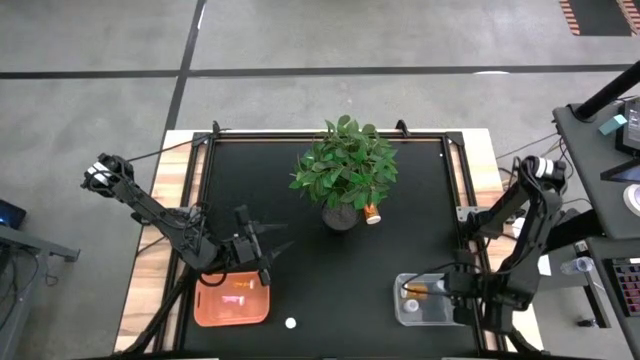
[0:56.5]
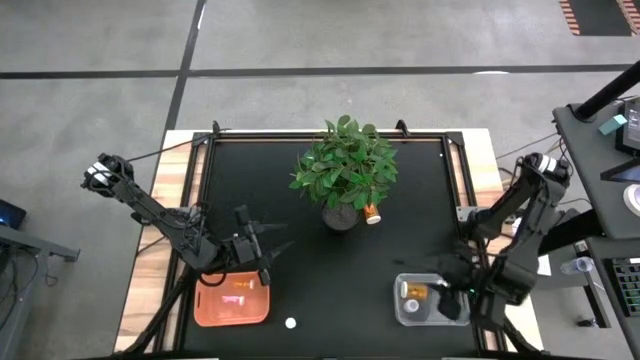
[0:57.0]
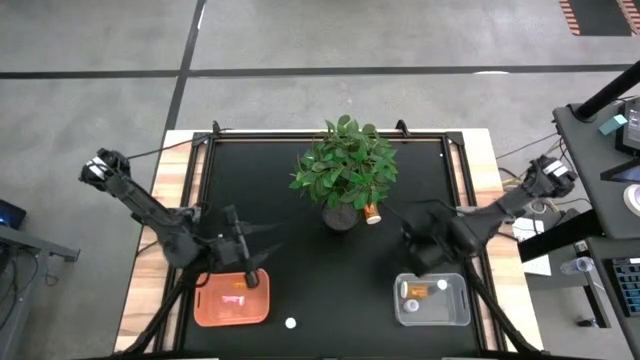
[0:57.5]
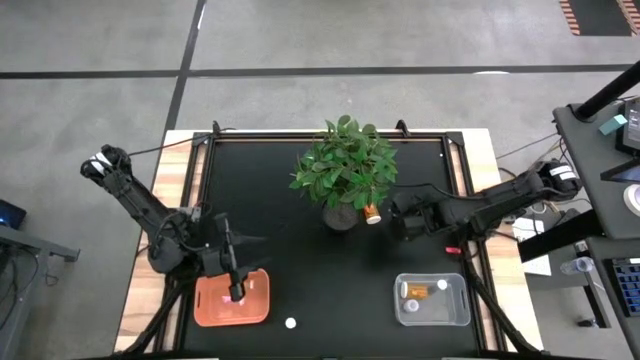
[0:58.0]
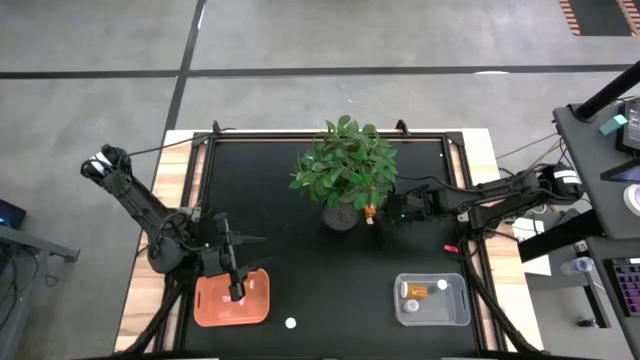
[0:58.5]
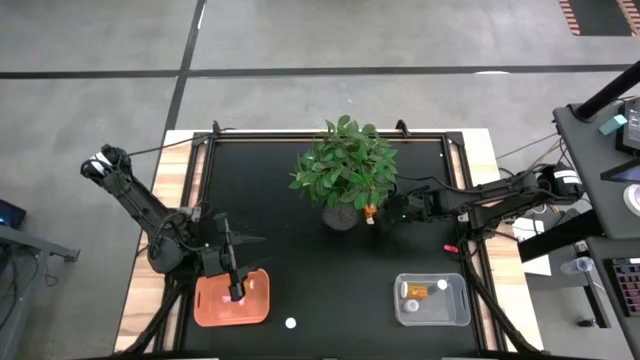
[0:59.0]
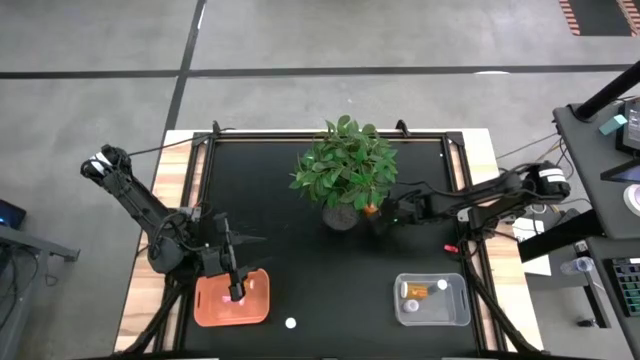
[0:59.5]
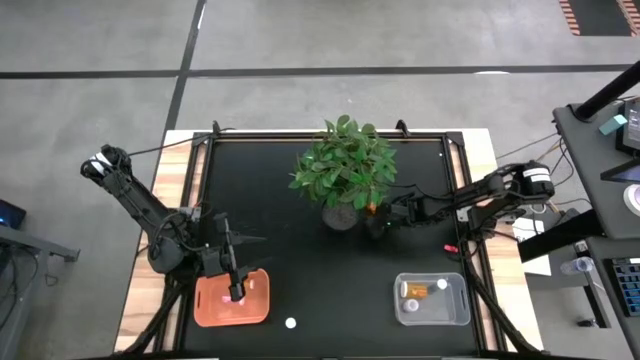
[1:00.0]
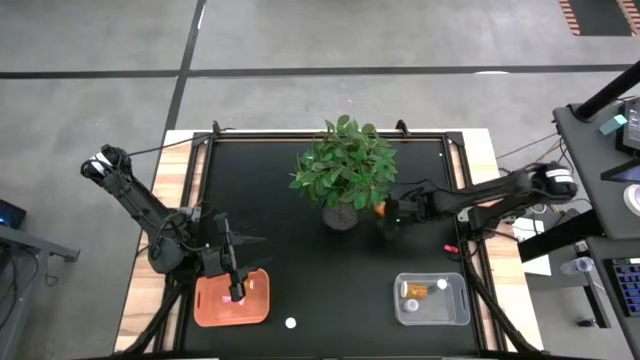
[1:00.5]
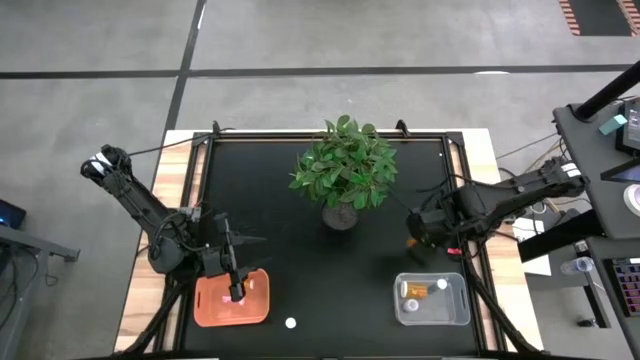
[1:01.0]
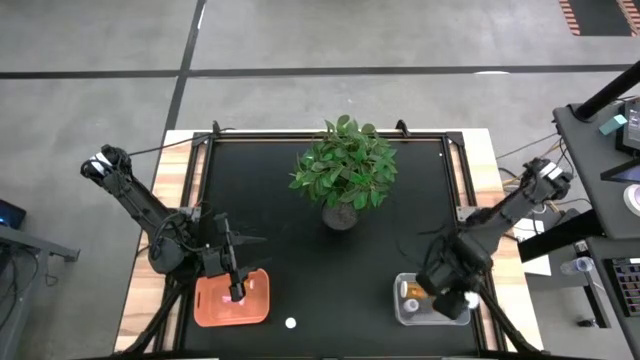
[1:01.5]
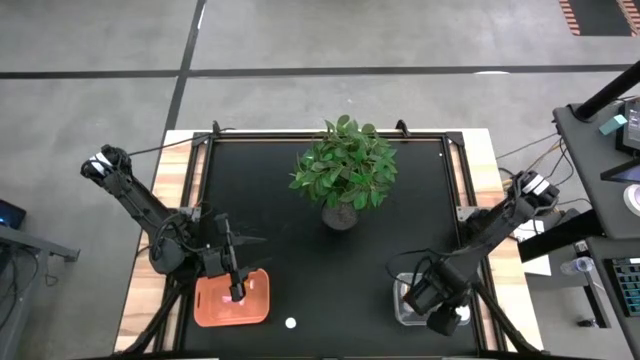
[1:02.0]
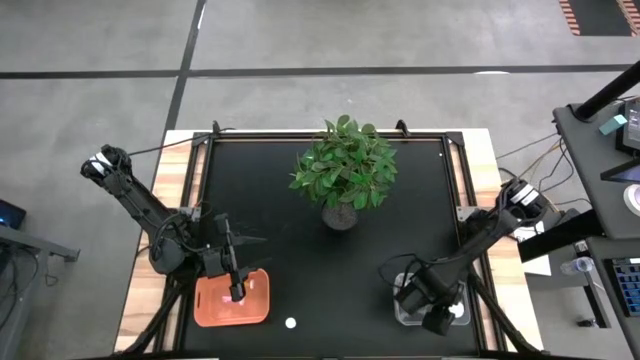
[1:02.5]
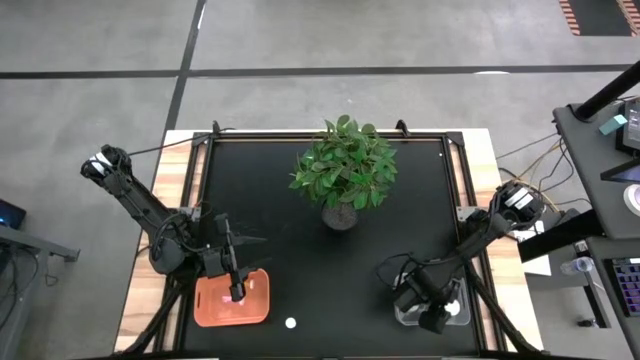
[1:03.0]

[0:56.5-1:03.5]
Task: Pick and place medicine bottles into bin by pill shape (circle, oval)
Put the orange capsule bottle into the transparent bin

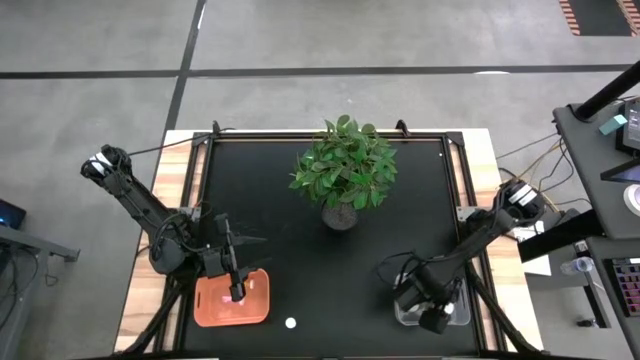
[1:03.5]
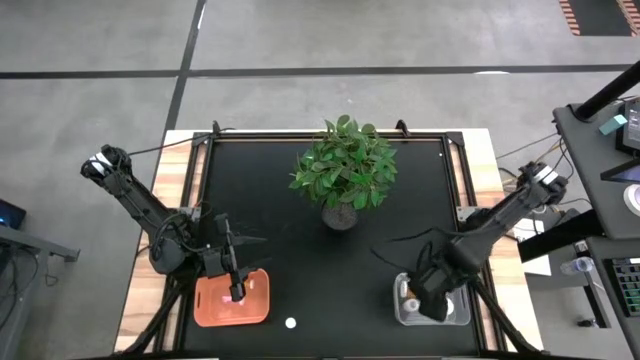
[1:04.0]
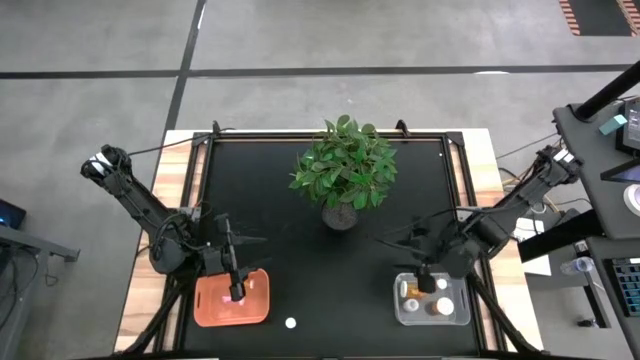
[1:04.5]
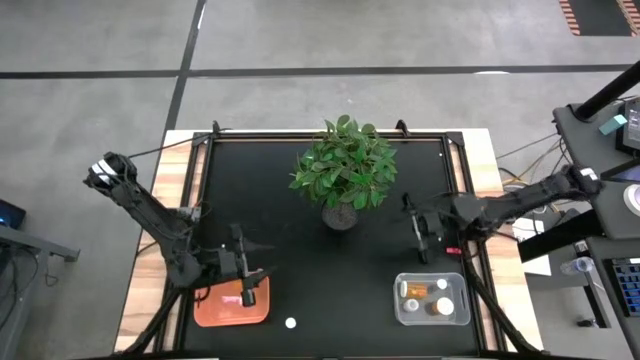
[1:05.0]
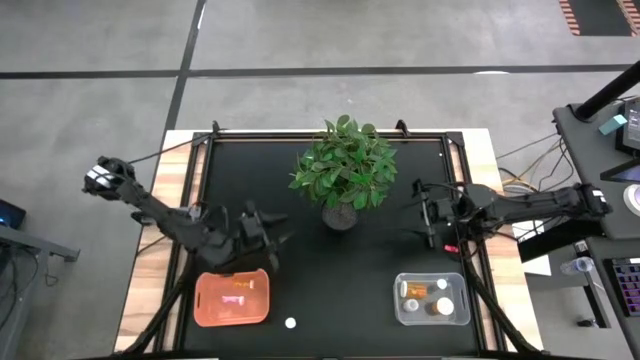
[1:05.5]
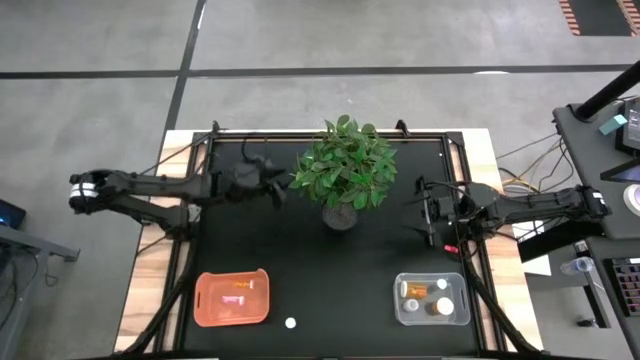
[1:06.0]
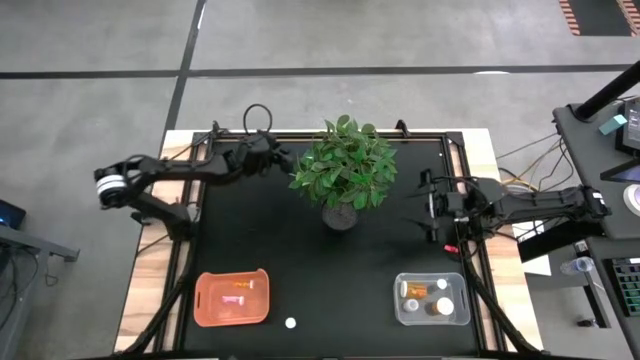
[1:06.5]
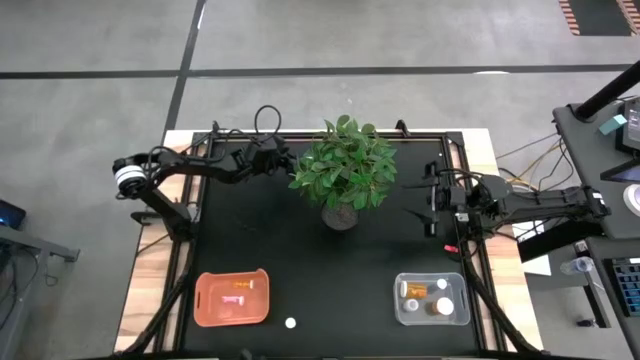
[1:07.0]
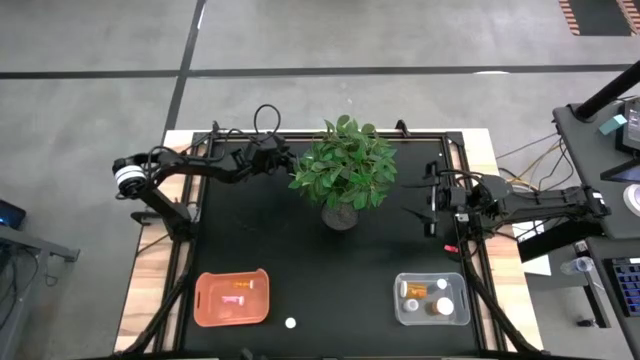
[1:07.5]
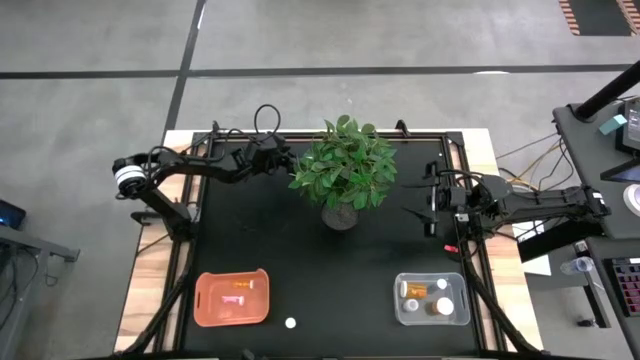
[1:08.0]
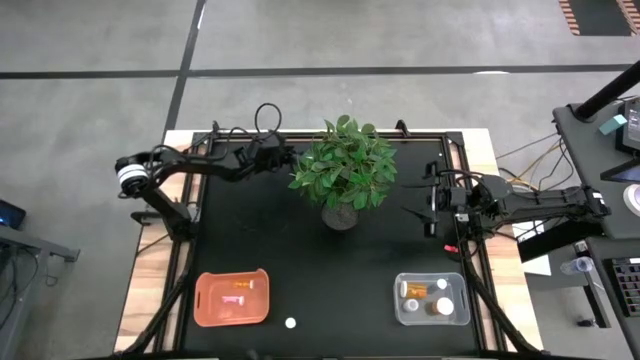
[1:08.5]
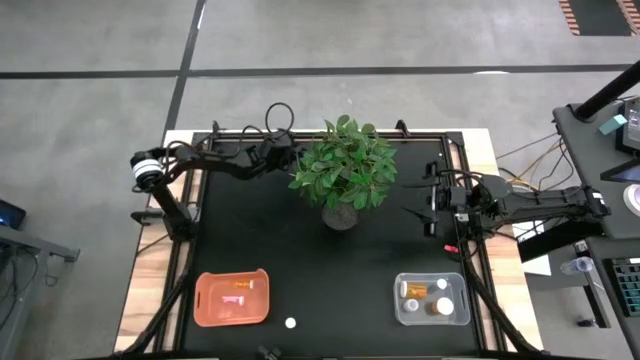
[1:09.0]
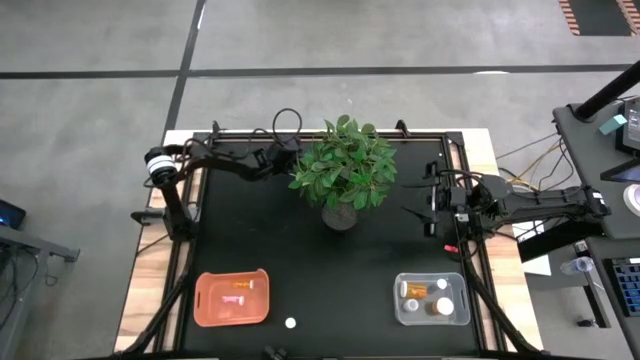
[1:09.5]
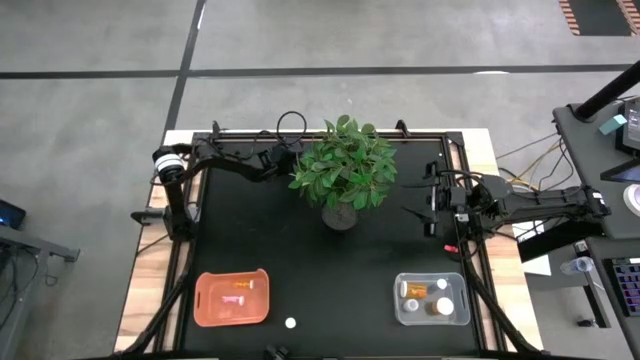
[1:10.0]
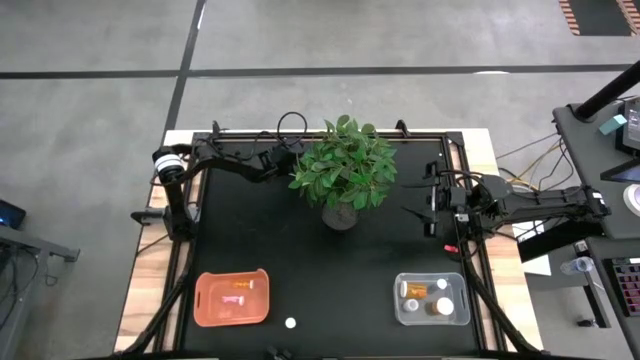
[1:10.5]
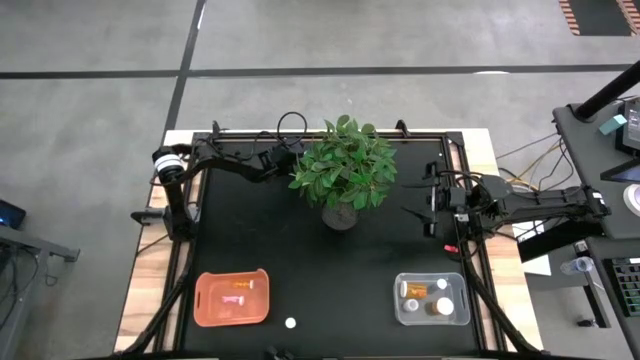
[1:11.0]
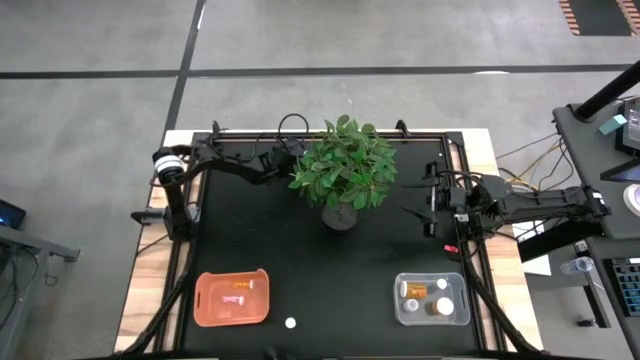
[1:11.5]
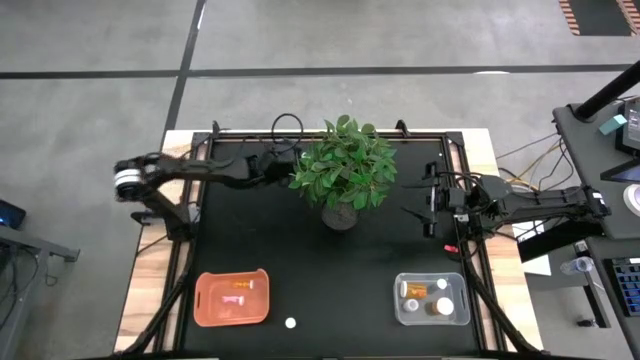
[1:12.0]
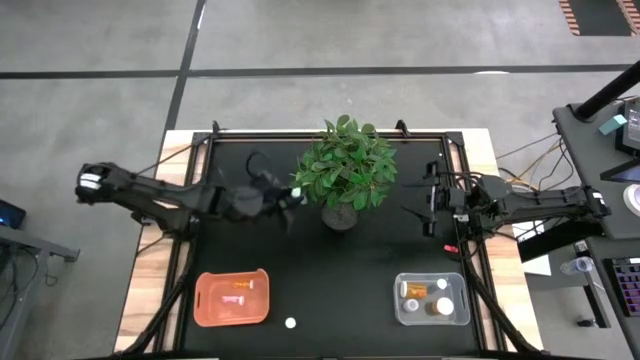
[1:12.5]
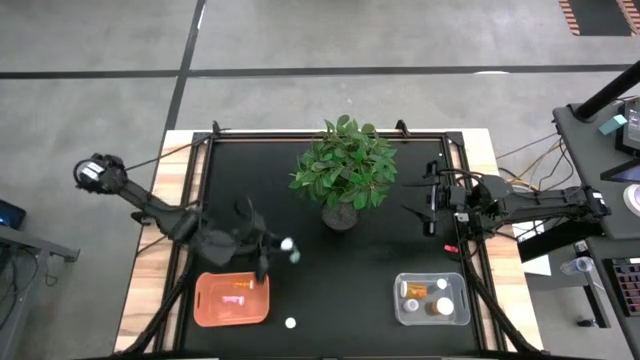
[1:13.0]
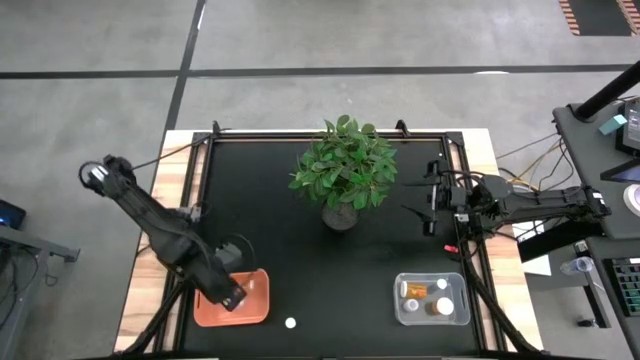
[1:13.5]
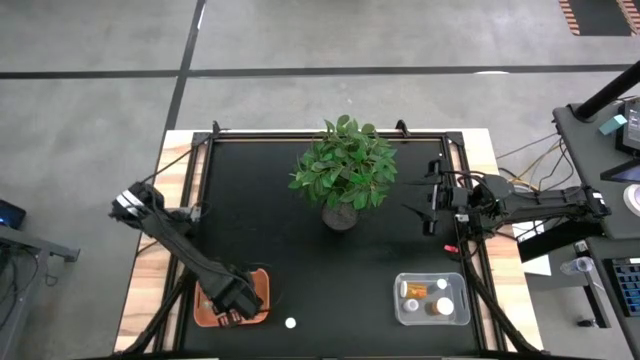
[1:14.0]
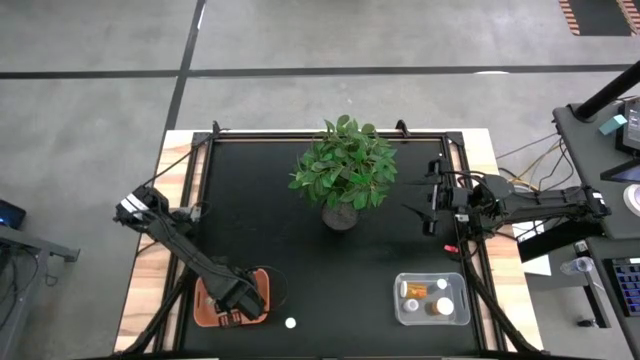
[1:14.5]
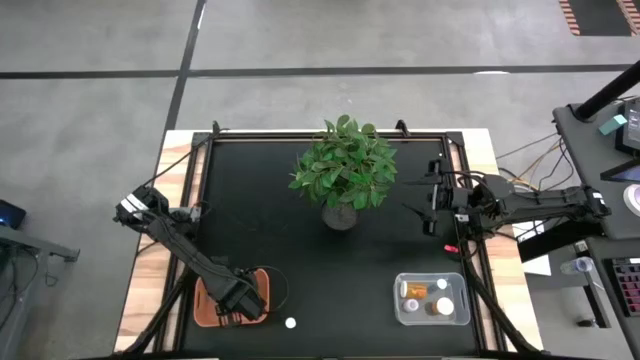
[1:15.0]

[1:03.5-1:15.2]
Put the green tablet bottle into the orange bin
